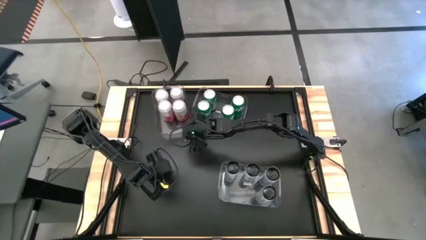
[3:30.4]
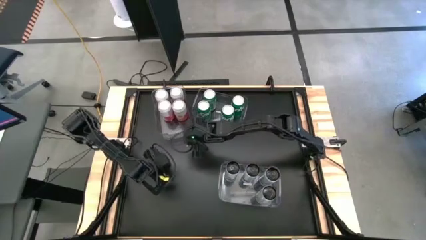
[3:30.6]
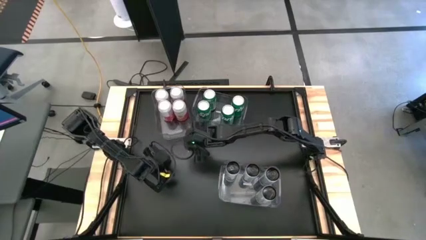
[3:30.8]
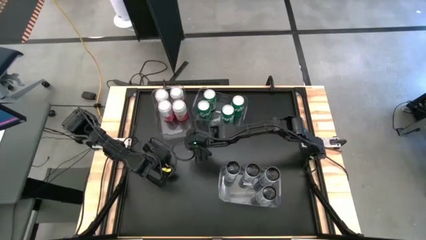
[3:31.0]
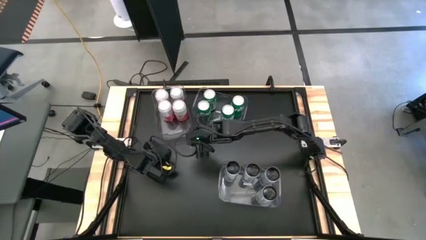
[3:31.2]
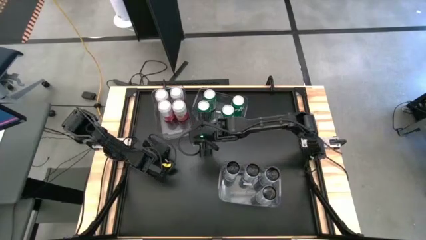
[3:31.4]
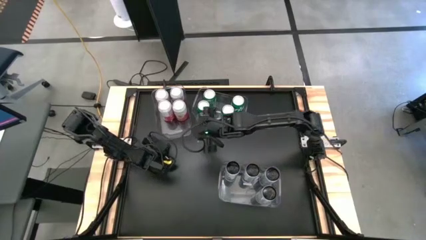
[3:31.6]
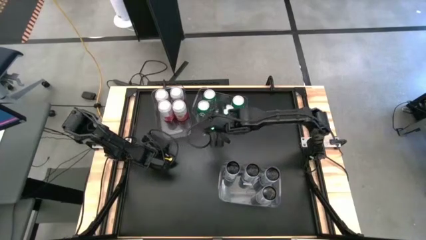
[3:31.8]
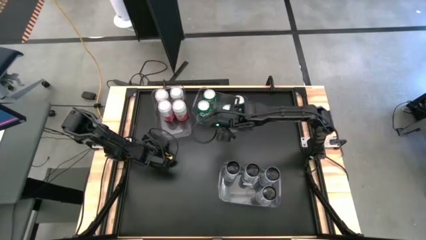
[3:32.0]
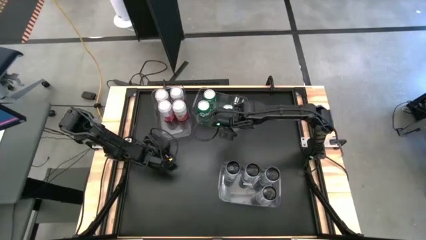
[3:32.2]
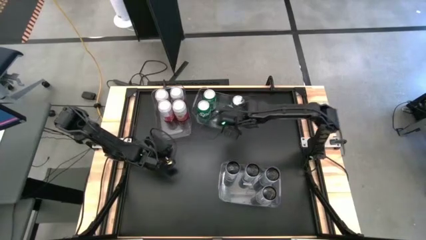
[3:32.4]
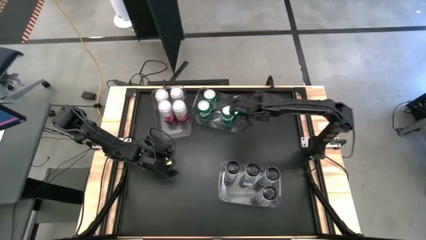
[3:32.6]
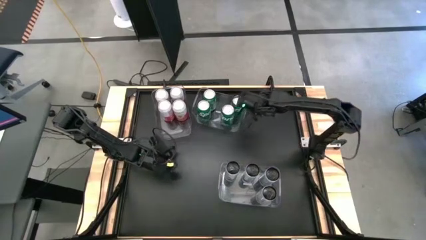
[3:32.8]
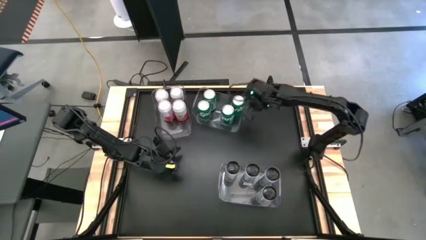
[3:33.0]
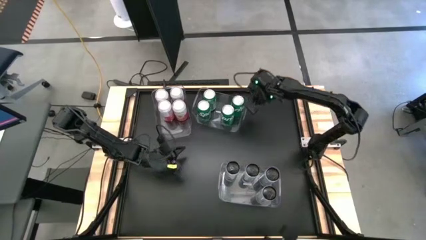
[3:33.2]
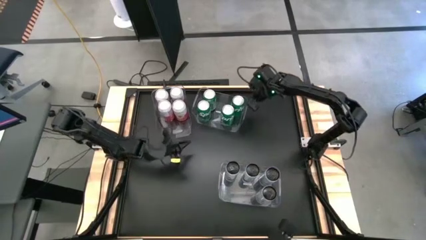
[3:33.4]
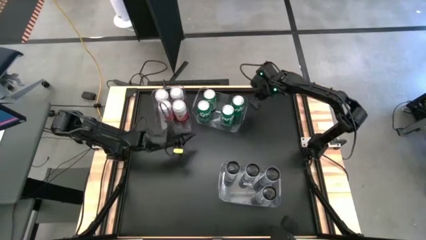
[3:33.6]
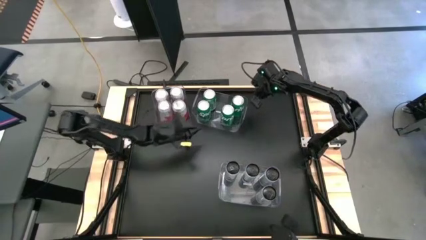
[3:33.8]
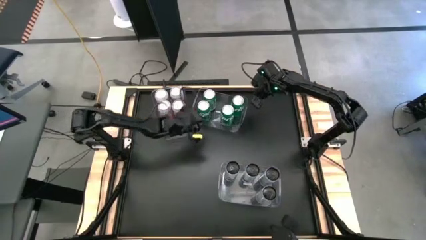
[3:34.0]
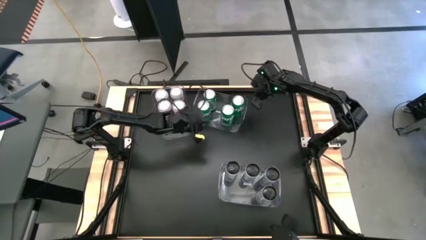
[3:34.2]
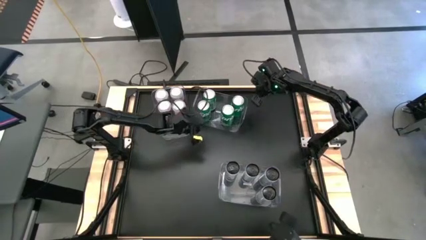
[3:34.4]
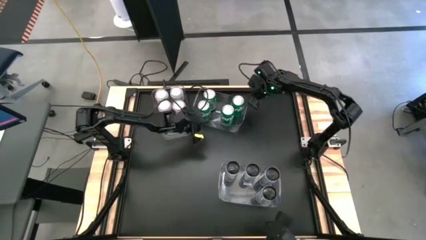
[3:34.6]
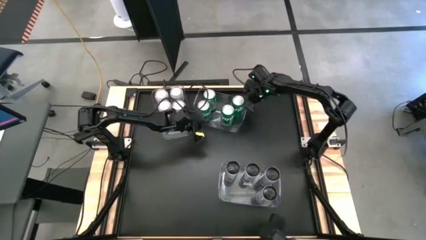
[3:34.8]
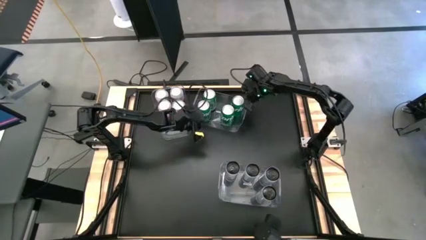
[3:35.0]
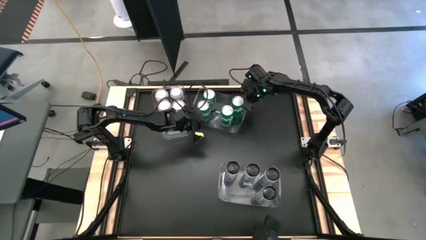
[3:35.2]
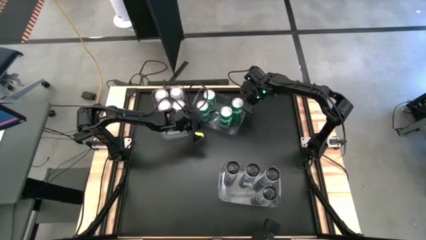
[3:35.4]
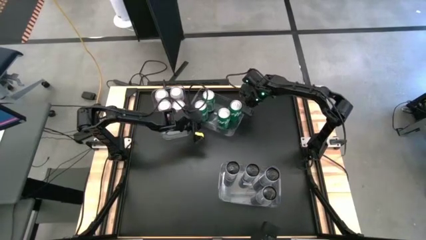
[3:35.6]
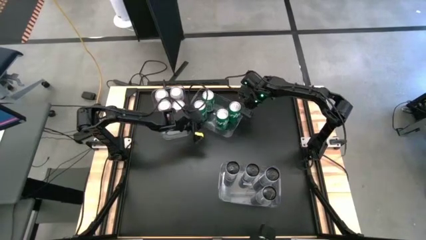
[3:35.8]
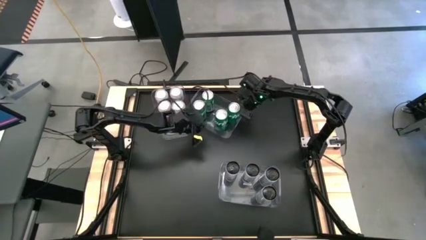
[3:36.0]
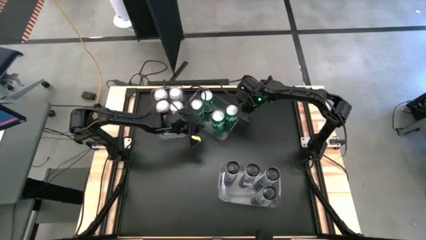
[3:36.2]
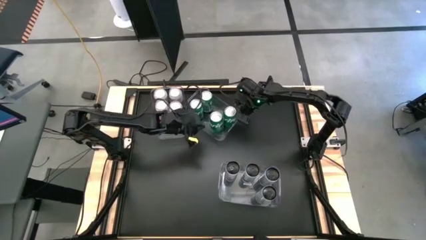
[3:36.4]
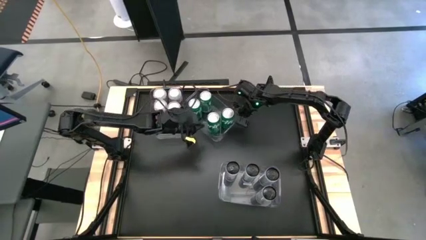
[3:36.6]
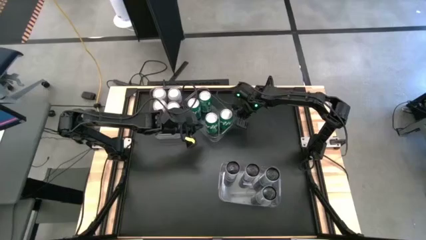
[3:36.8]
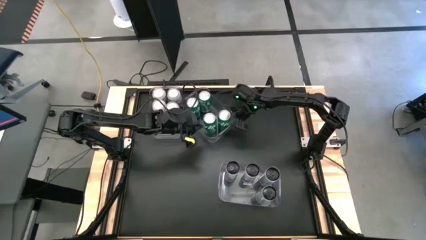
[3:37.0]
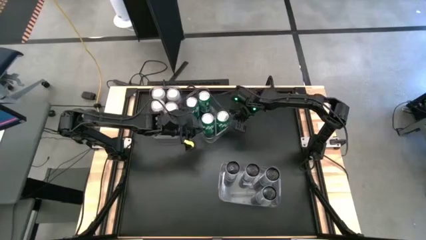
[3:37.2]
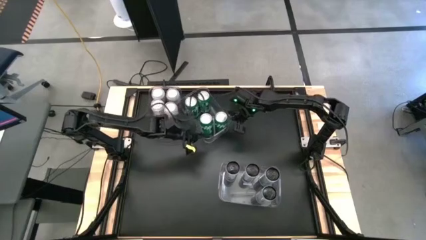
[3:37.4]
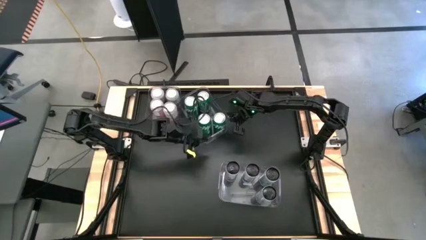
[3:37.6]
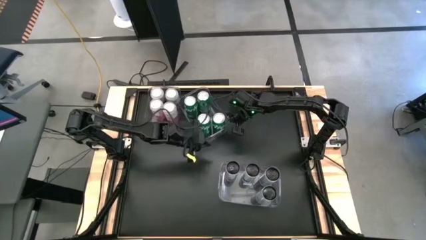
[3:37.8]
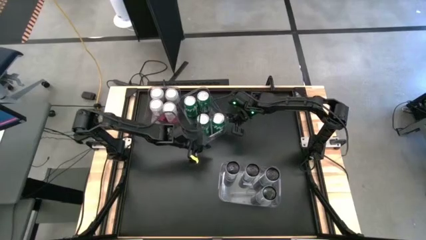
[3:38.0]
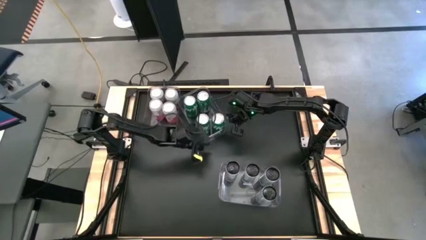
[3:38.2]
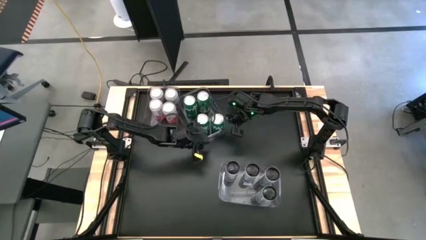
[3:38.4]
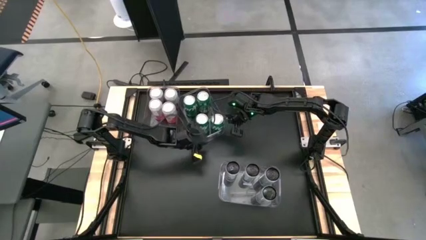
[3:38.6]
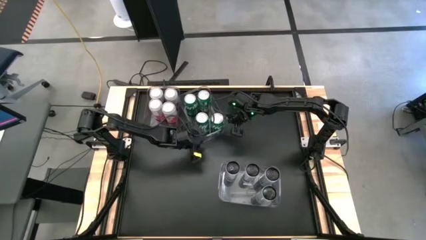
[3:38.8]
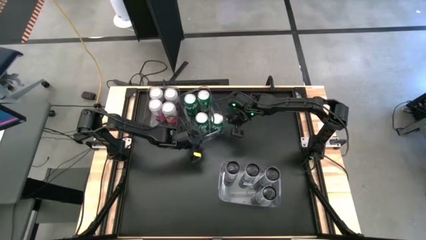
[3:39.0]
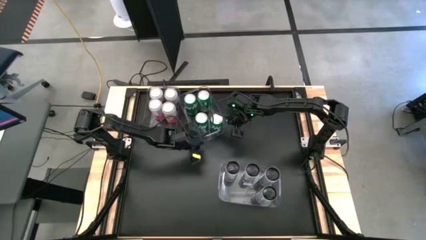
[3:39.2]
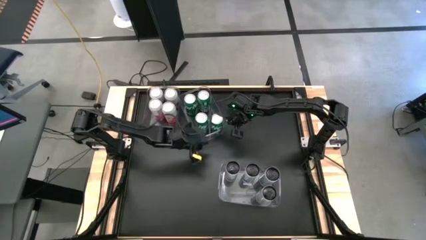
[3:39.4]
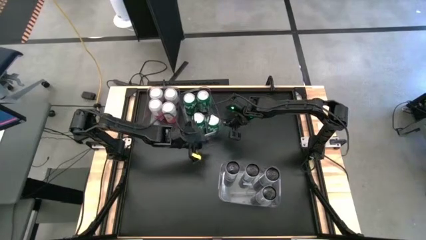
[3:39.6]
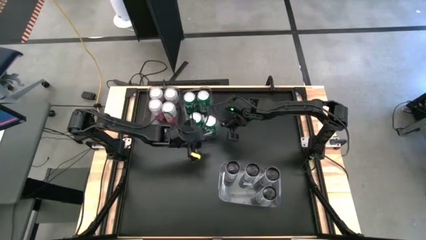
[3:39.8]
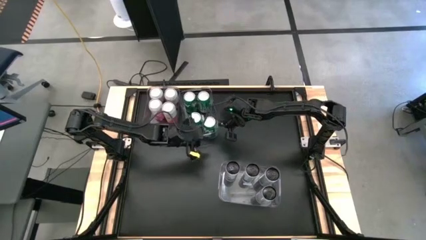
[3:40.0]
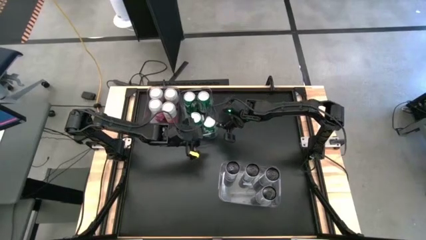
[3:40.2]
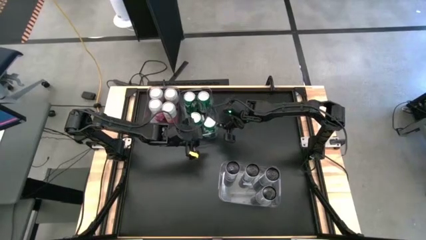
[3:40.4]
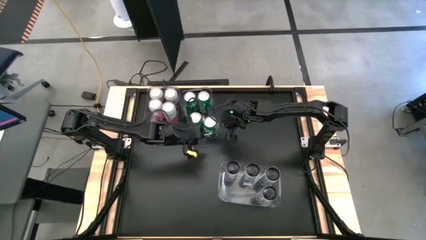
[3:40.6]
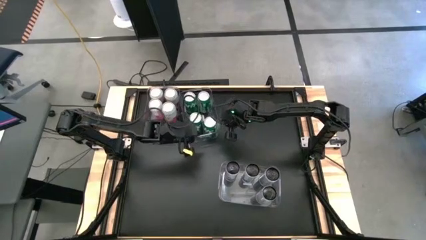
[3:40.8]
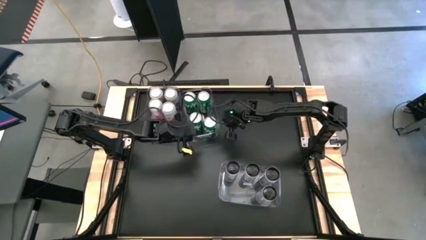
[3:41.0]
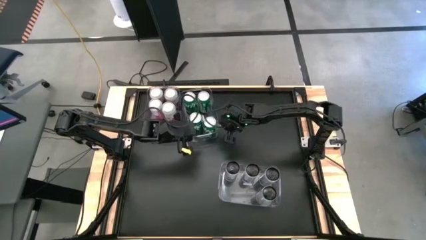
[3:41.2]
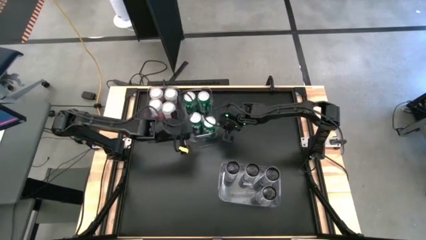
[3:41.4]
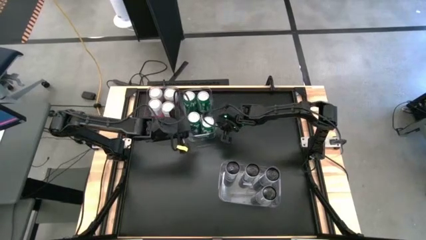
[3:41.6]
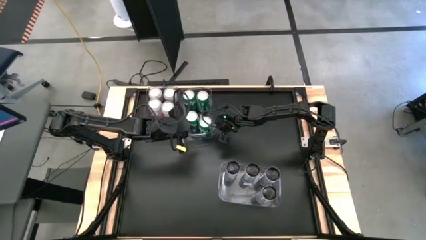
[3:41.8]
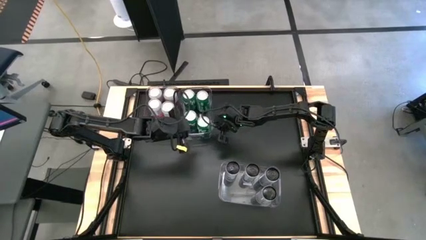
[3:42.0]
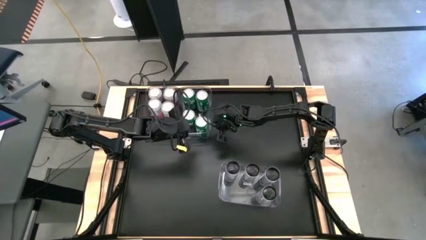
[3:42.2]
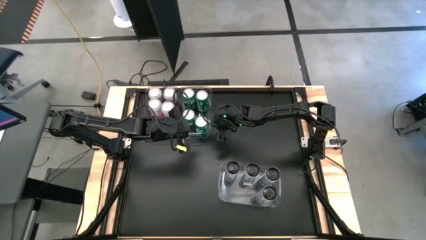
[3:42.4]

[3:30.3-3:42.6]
Task: Sort soda cans
Move the top transparent bin to the right side of the top left transparent bin
